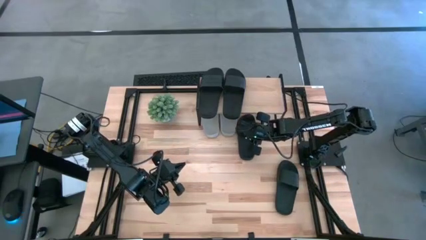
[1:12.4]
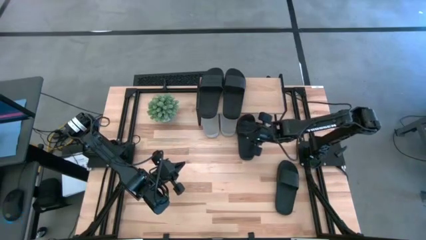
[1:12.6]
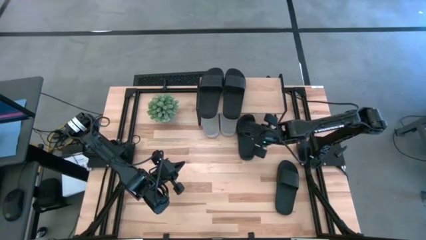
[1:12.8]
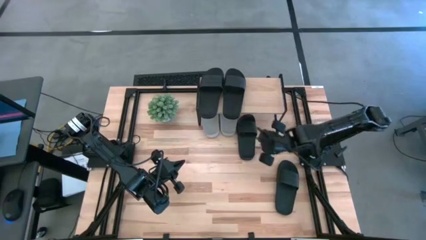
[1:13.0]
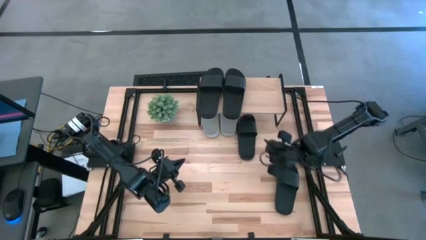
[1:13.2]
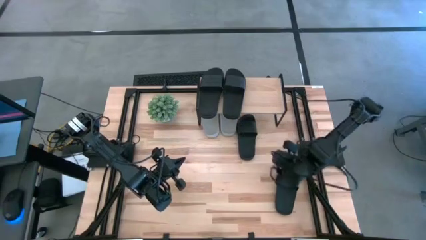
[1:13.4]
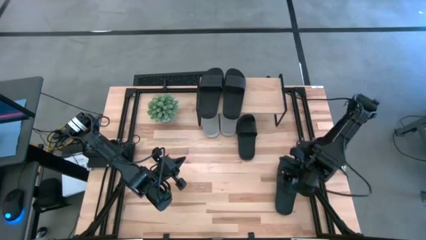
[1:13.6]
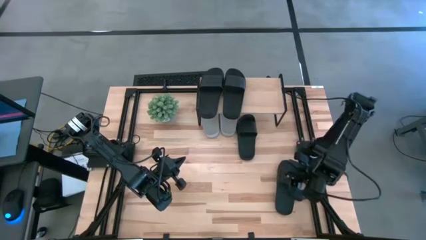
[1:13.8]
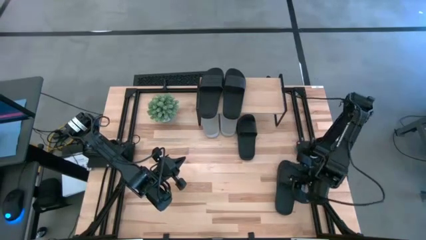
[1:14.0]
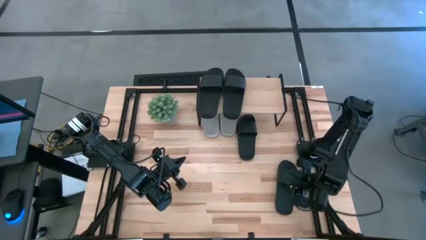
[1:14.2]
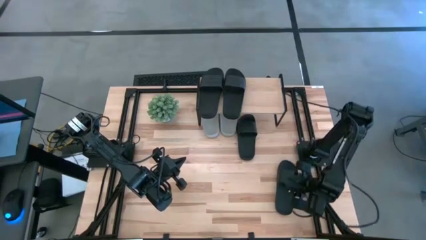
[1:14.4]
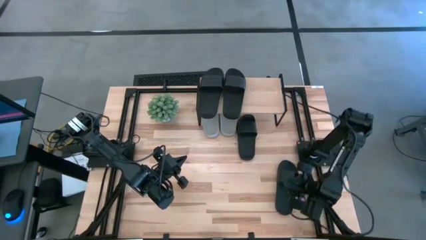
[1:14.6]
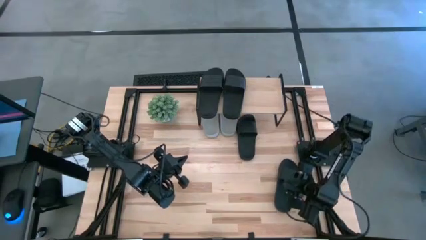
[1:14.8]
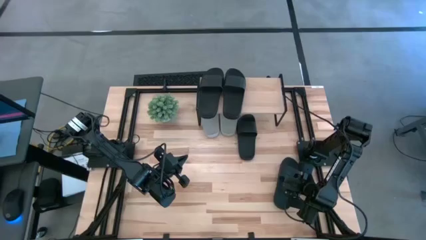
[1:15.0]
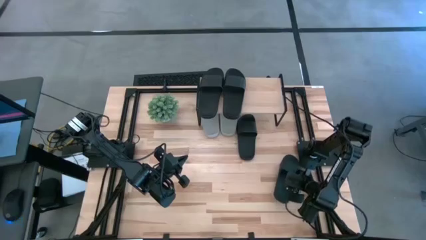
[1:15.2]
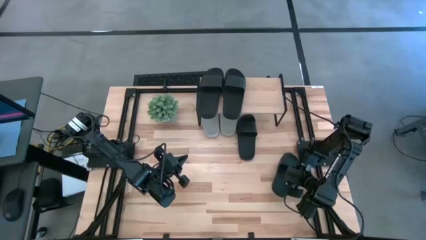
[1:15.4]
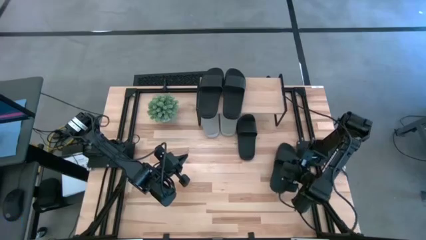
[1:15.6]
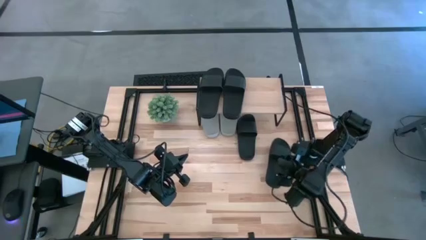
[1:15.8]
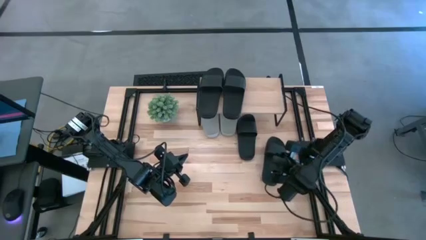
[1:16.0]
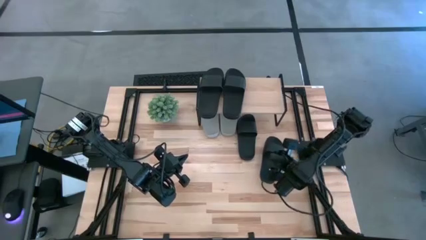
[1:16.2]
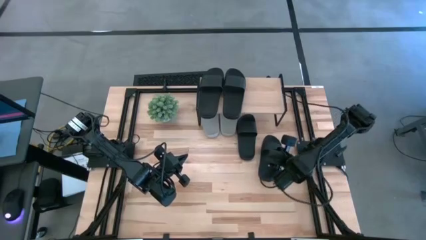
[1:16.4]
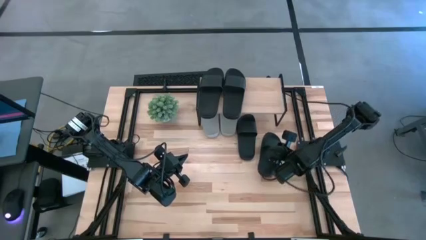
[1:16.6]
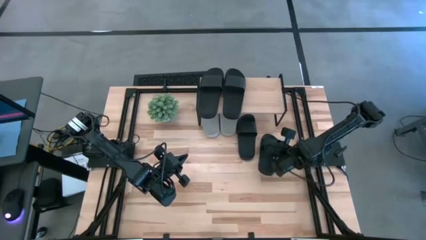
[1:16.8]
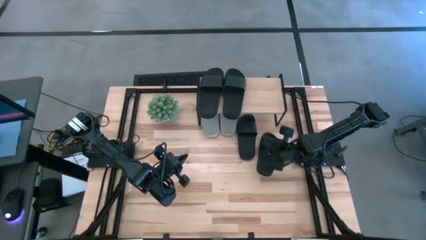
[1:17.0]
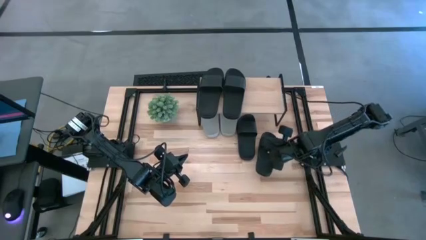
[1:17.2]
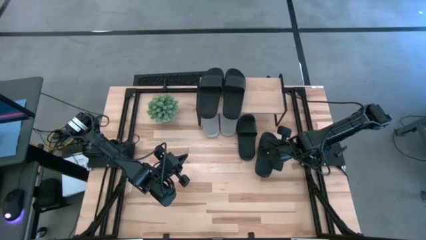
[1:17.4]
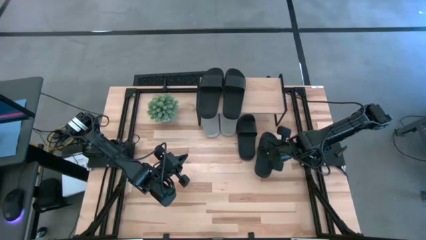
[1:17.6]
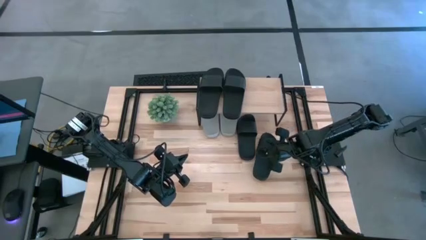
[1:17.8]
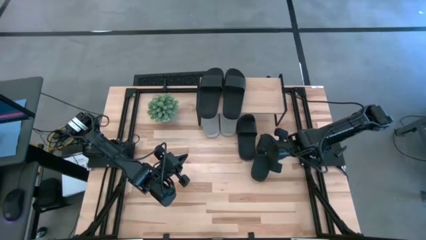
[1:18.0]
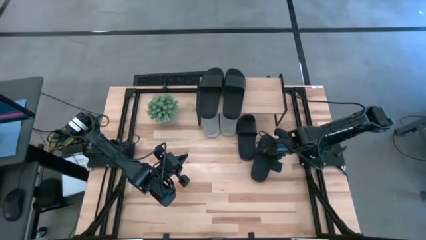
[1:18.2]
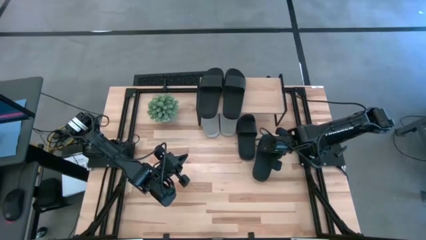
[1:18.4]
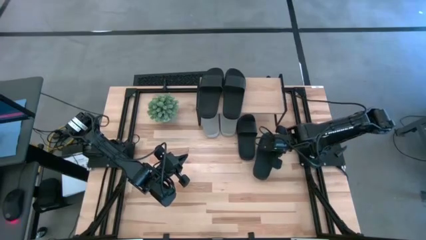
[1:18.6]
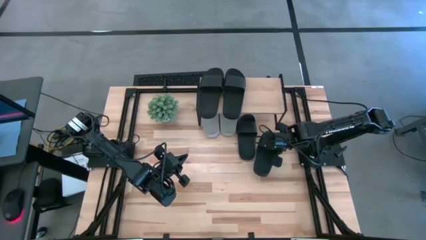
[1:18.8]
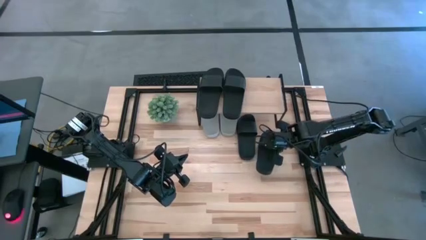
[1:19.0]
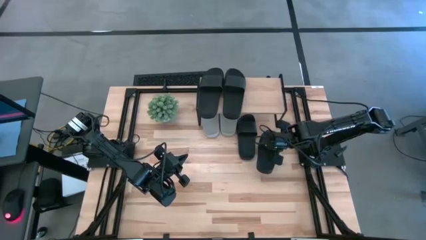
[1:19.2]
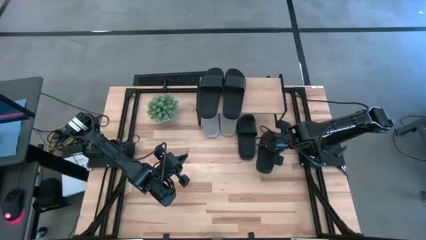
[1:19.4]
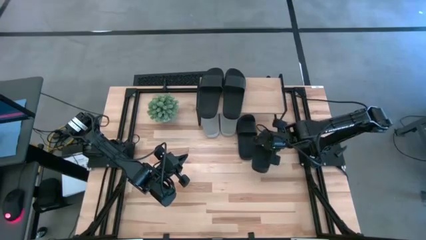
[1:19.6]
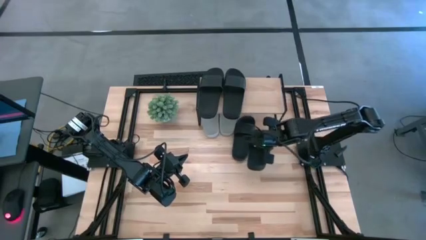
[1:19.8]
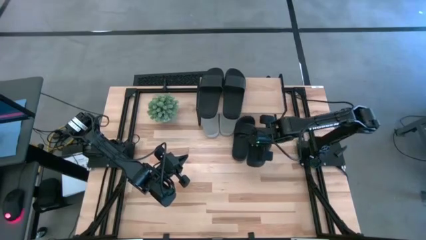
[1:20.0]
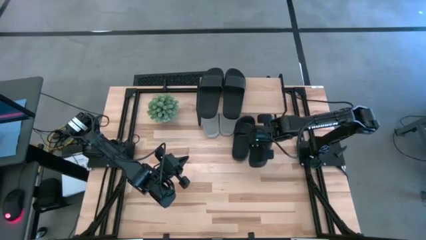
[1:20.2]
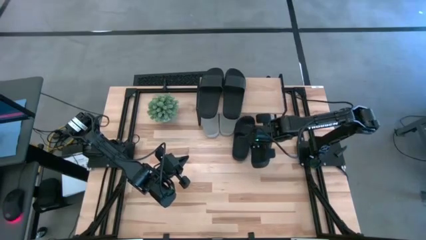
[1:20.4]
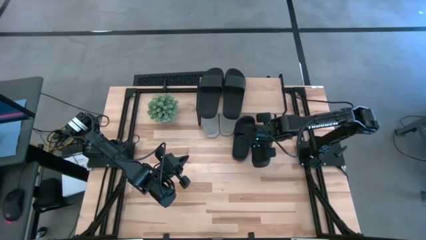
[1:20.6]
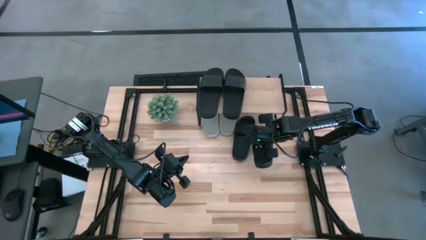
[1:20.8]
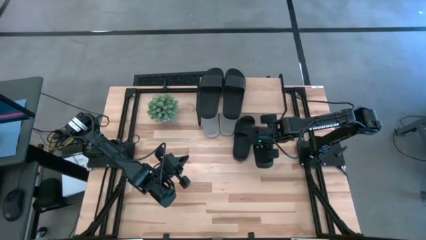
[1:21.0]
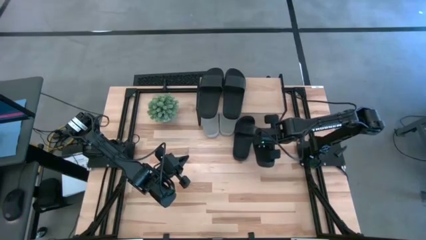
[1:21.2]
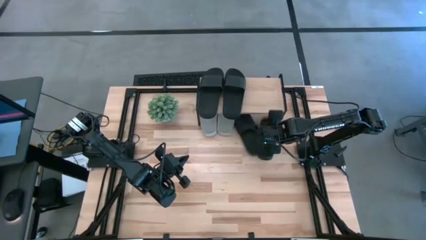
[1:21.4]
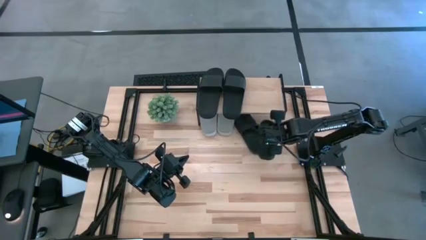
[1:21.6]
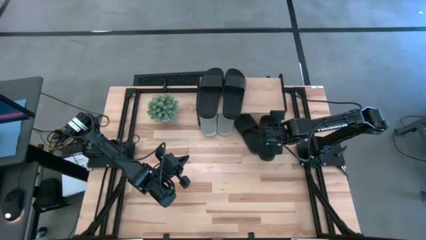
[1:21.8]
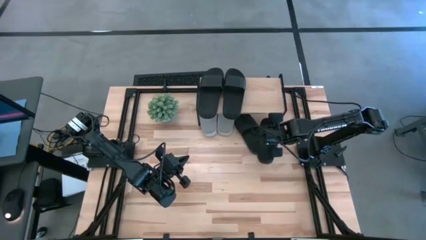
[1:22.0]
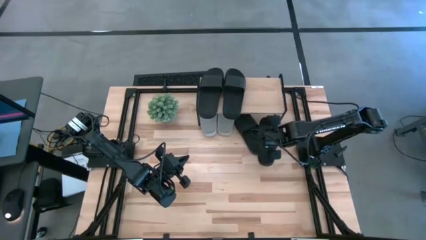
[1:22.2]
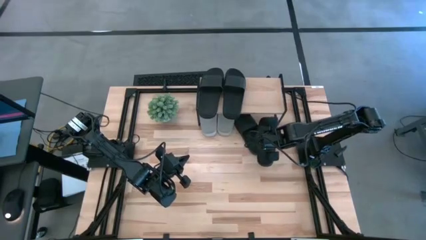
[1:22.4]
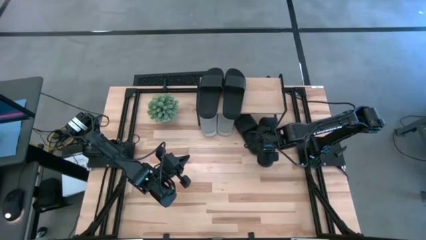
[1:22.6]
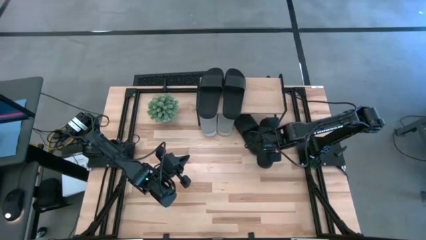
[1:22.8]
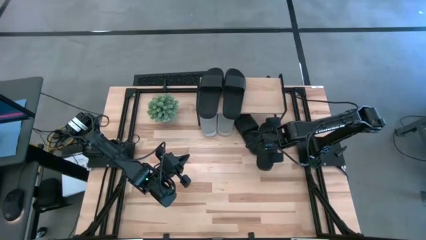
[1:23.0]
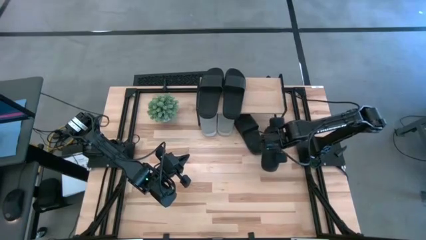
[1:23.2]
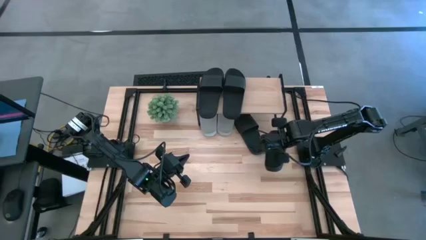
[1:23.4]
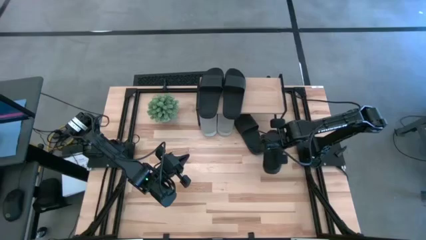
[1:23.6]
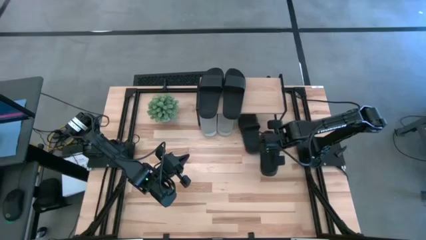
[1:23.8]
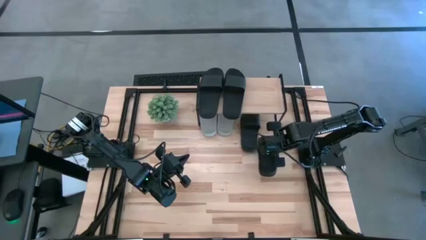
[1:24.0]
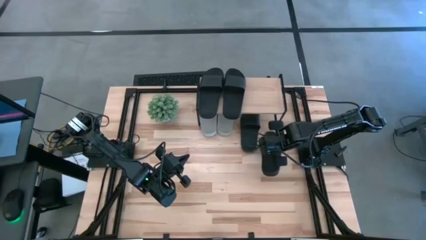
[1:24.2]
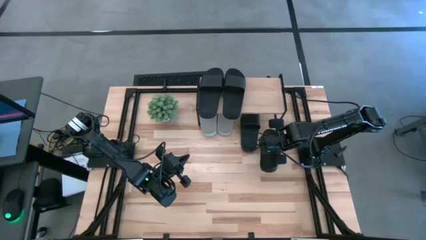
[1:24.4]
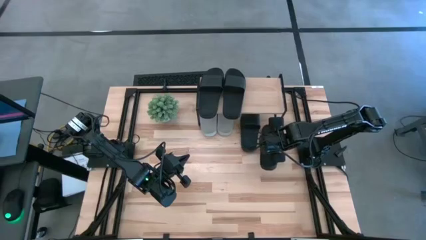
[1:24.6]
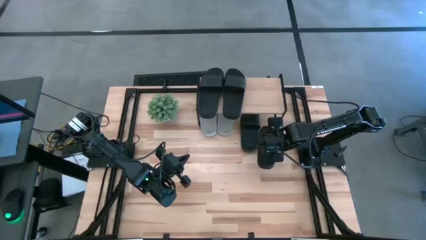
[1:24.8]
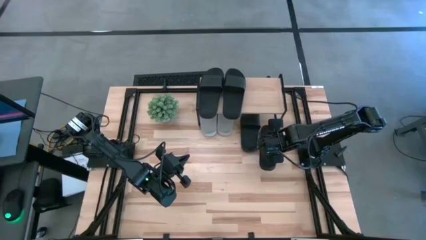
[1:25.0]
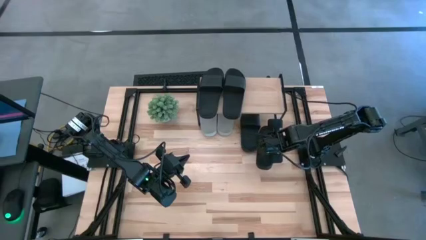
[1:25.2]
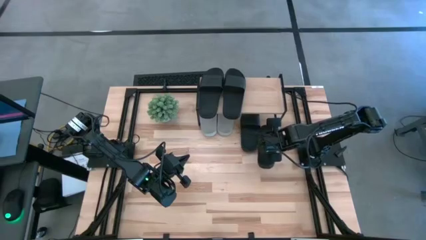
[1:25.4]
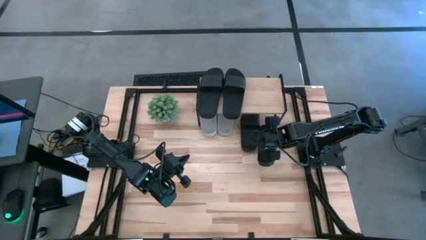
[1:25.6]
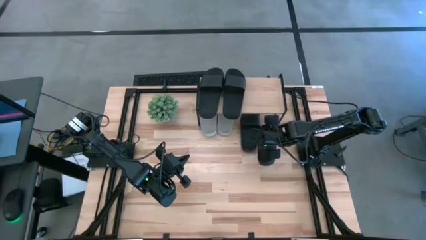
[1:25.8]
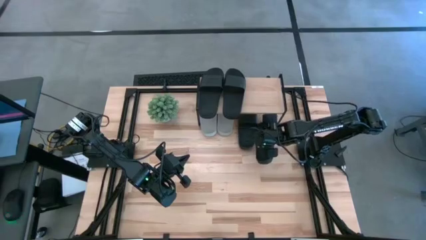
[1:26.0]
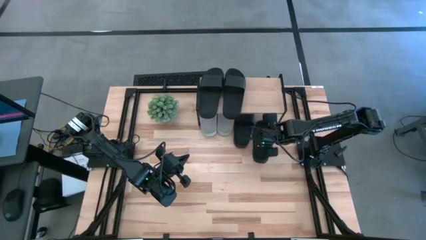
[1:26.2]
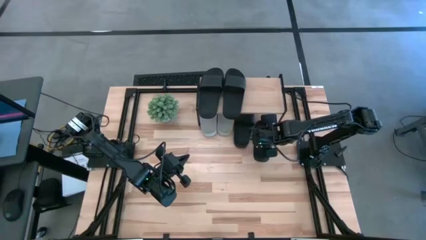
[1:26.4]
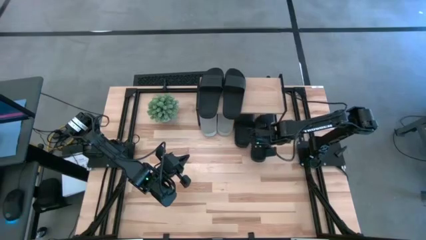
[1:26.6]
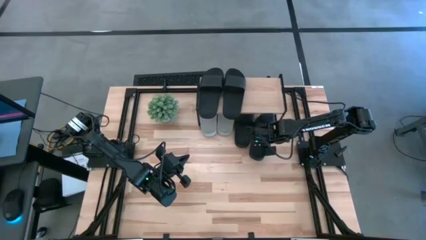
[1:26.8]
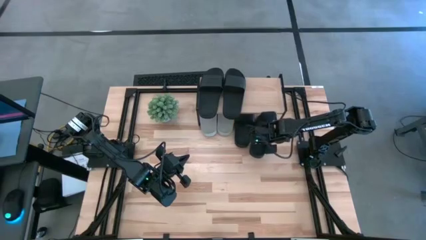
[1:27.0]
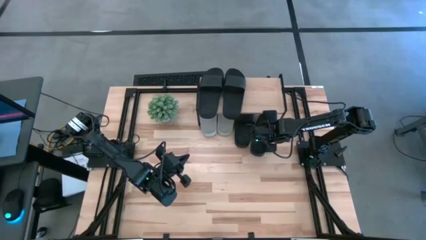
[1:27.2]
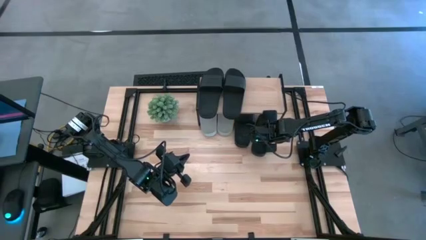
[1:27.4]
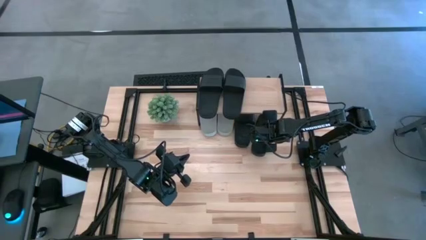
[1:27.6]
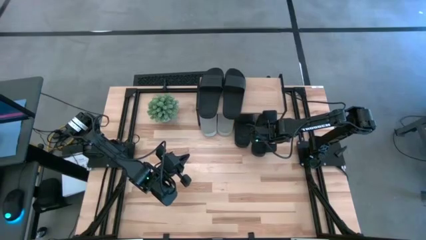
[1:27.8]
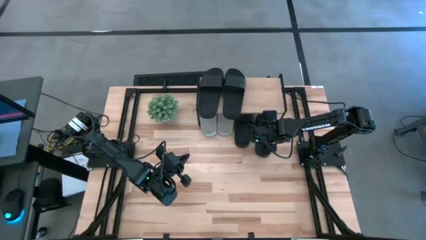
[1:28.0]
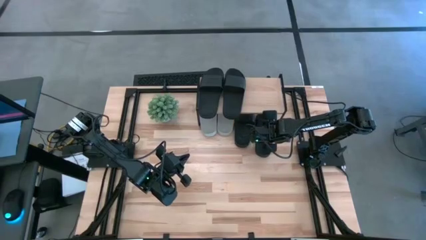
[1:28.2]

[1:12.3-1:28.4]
Task: Pick and place slides into the shelf
Put the black slide under the shelf

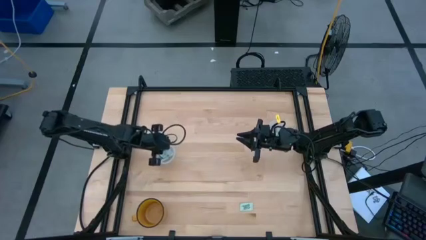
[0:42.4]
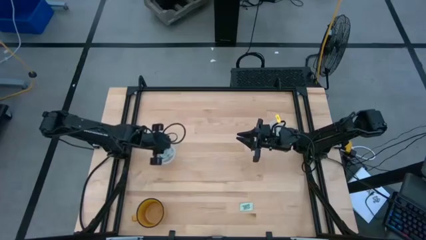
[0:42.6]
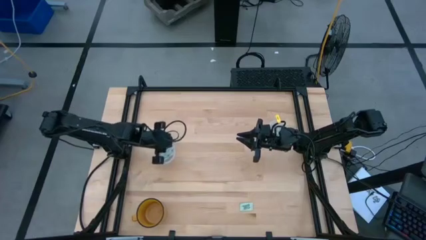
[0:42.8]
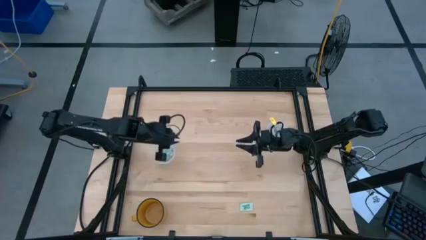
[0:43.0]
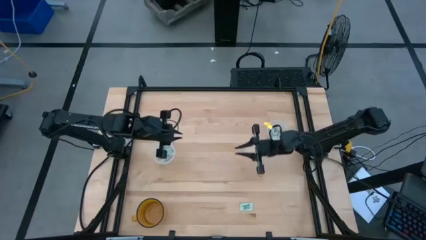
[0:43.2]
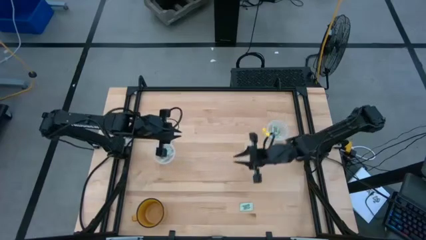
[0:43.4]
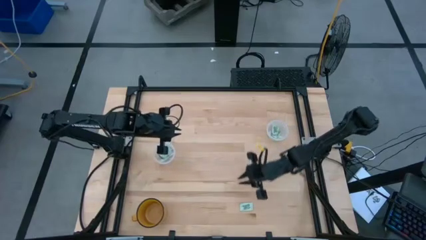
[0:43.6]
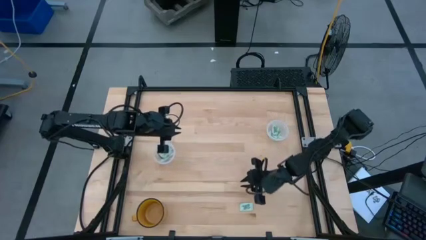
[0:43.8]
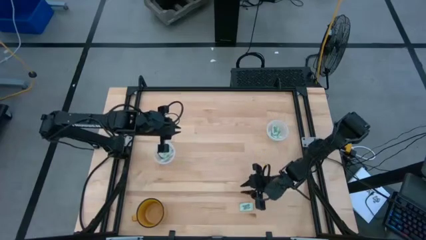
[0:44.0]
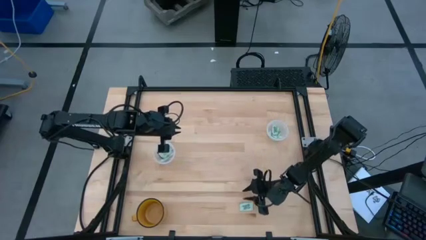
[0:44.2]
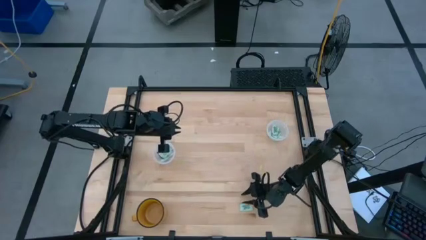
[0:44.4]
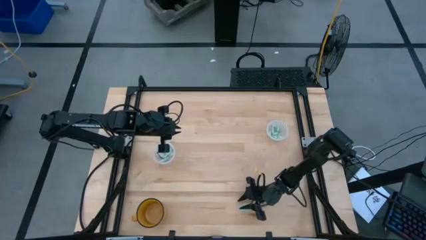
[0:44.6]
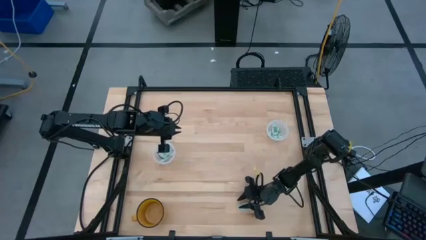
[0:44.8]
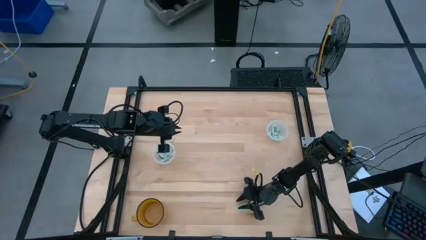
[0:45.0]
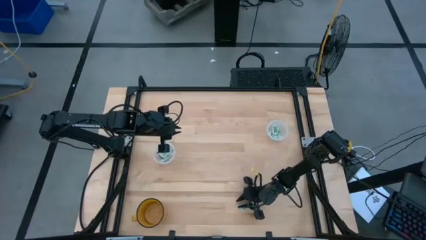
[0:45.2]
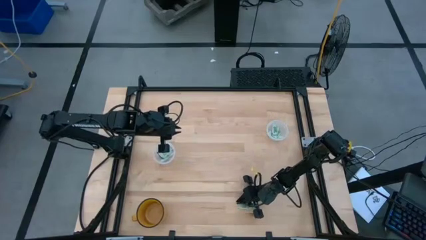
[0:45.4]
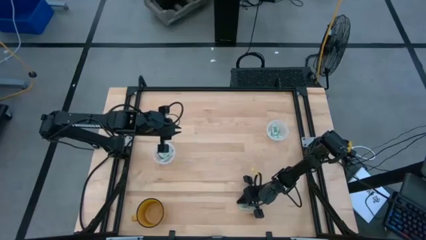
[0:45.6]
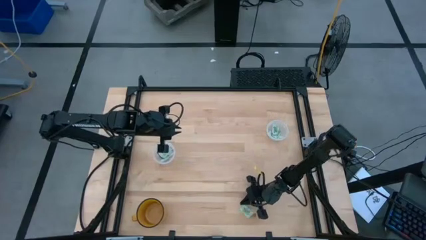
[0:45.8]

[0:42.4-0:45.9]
Task: Pick and place items into bin
Put the green stevia packet into the right transparent bin
